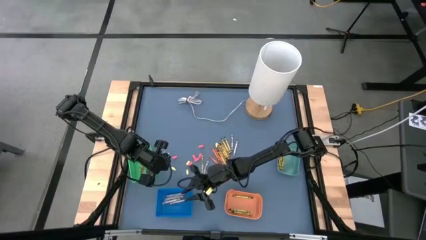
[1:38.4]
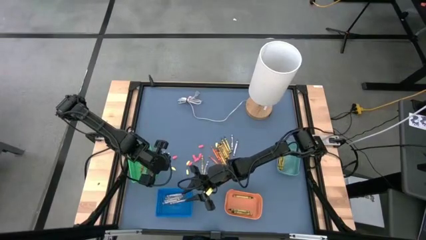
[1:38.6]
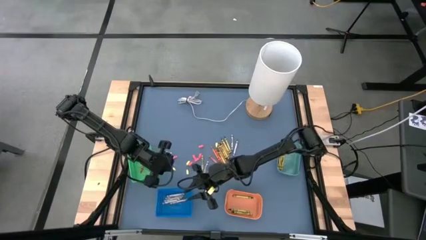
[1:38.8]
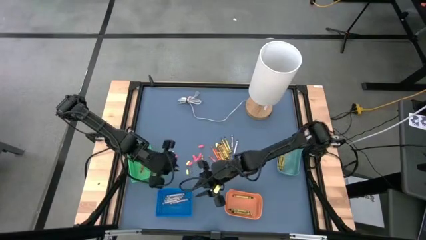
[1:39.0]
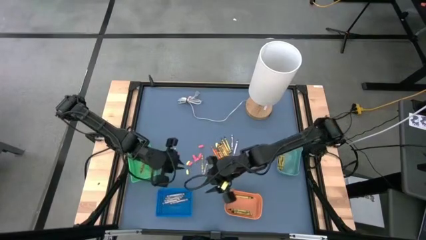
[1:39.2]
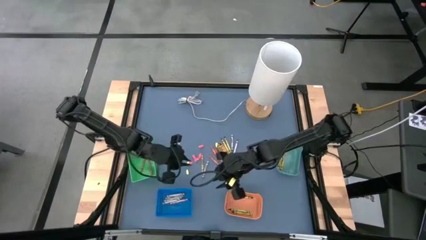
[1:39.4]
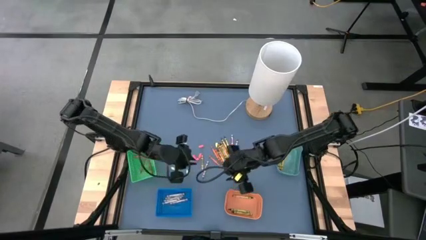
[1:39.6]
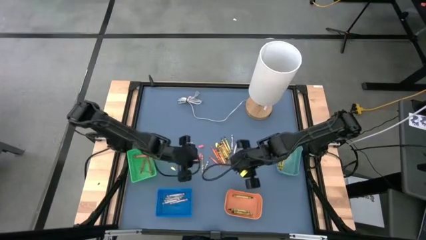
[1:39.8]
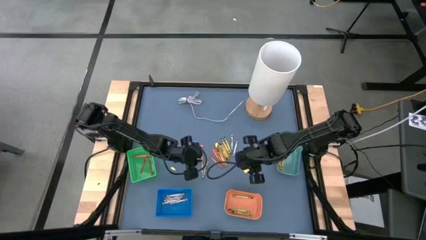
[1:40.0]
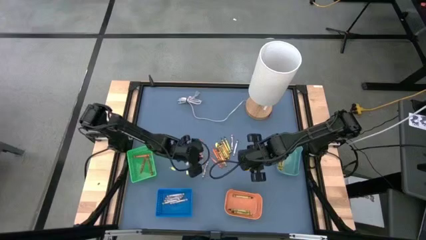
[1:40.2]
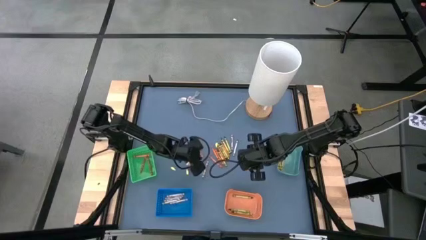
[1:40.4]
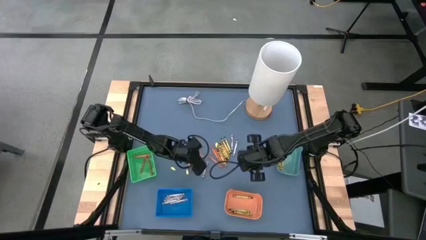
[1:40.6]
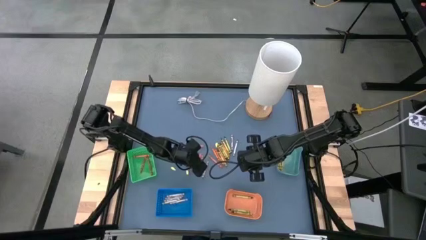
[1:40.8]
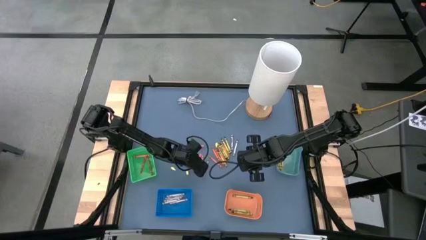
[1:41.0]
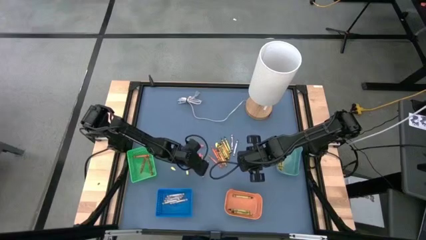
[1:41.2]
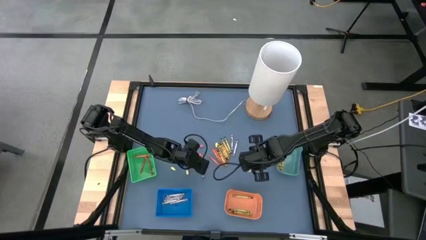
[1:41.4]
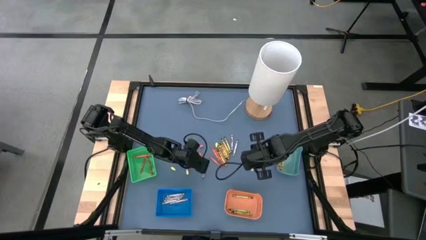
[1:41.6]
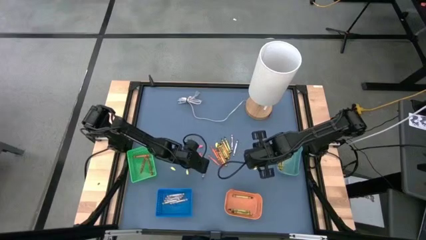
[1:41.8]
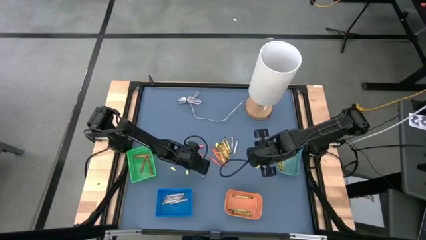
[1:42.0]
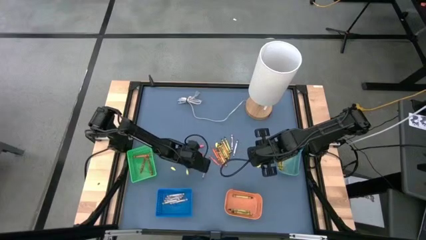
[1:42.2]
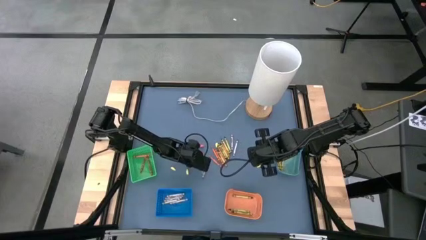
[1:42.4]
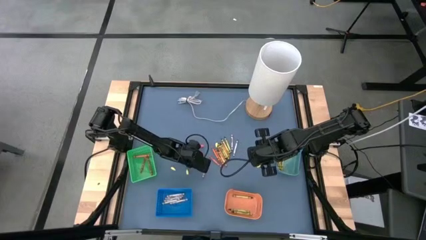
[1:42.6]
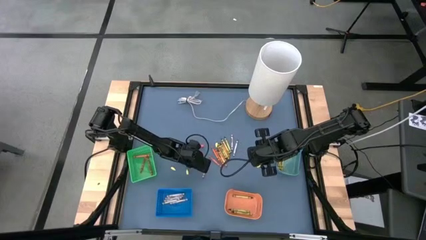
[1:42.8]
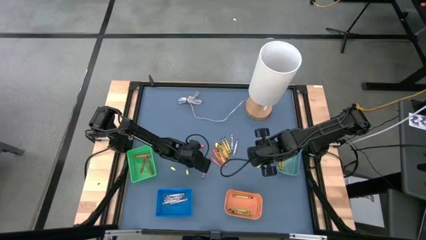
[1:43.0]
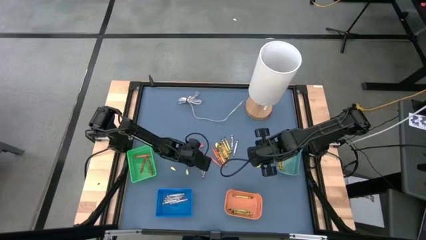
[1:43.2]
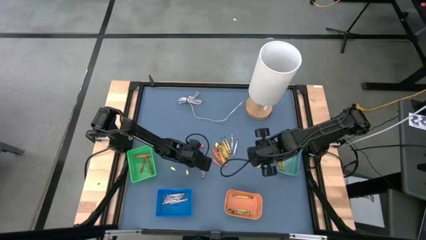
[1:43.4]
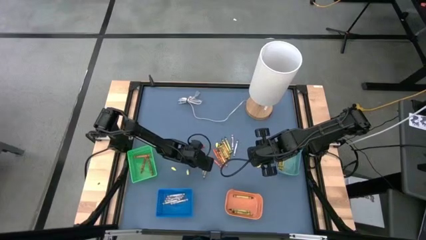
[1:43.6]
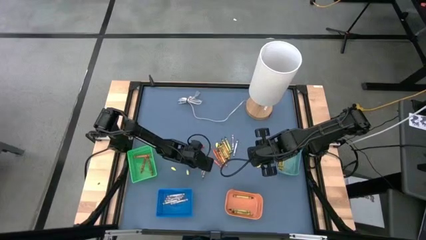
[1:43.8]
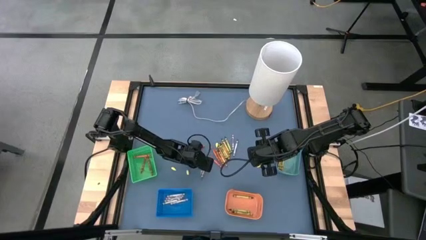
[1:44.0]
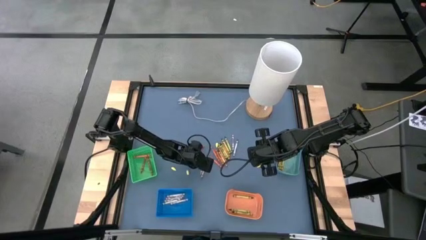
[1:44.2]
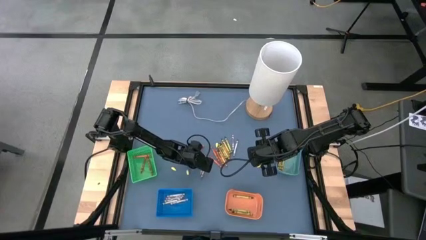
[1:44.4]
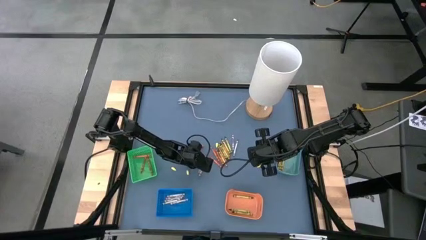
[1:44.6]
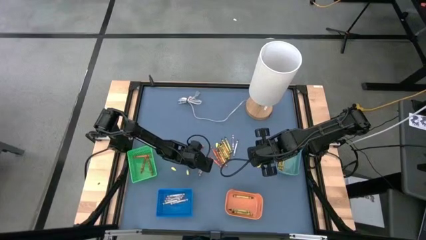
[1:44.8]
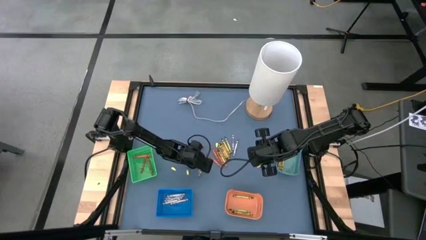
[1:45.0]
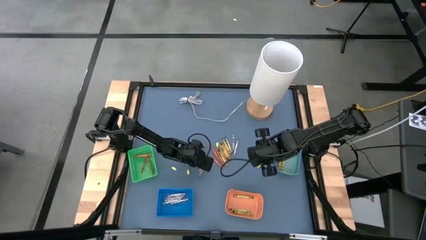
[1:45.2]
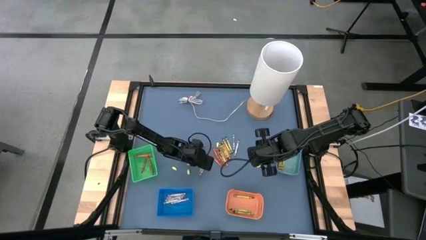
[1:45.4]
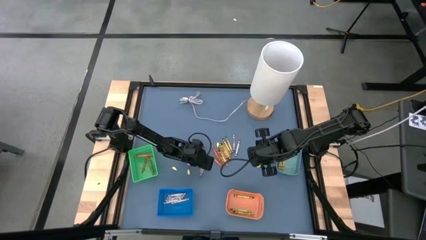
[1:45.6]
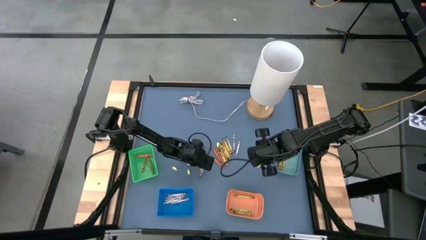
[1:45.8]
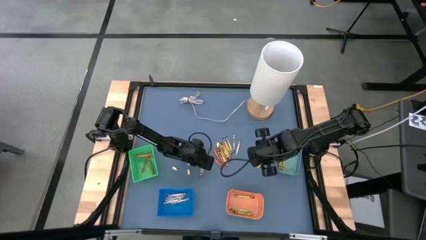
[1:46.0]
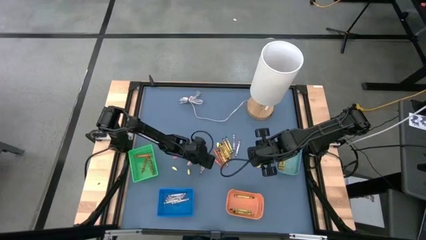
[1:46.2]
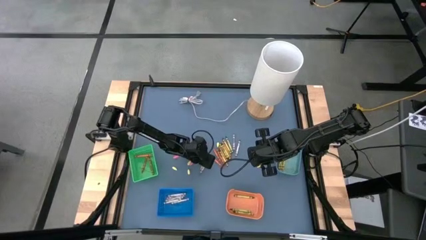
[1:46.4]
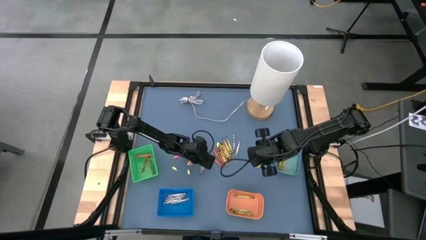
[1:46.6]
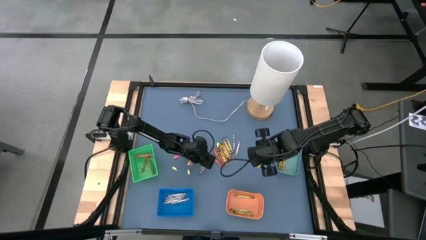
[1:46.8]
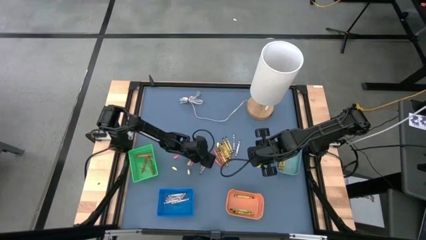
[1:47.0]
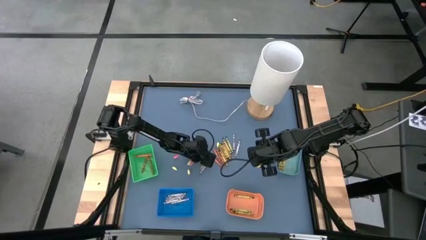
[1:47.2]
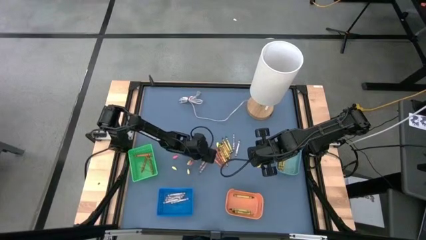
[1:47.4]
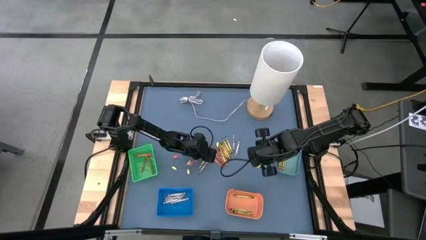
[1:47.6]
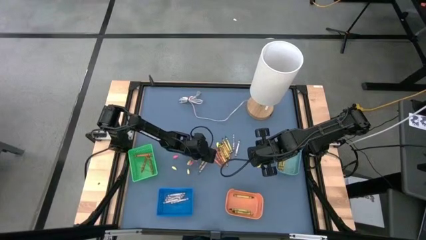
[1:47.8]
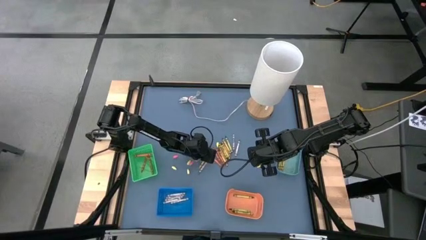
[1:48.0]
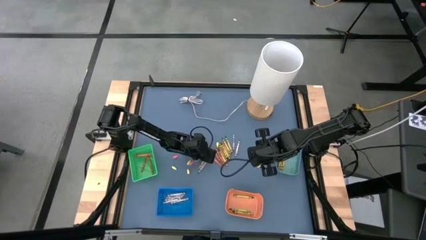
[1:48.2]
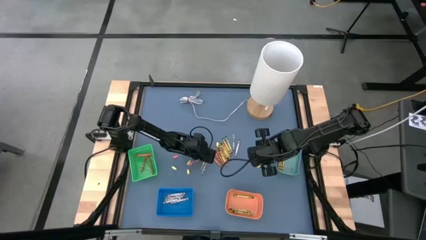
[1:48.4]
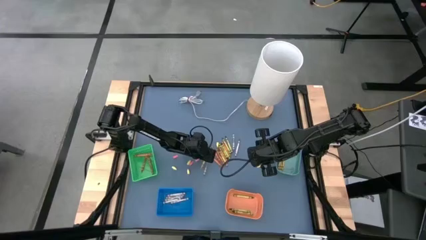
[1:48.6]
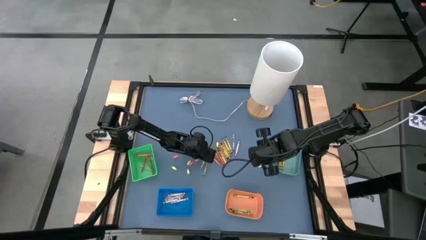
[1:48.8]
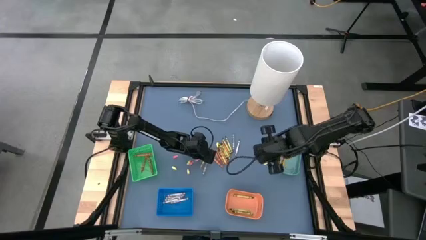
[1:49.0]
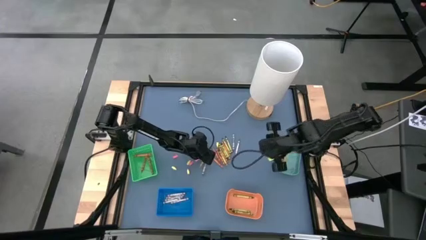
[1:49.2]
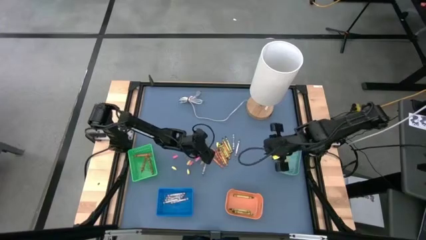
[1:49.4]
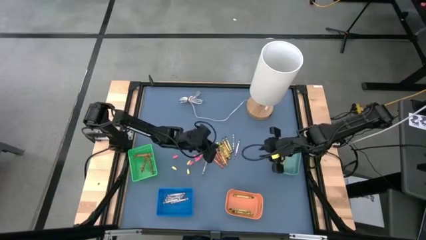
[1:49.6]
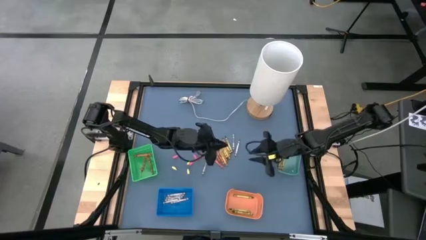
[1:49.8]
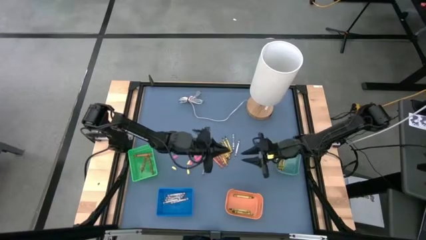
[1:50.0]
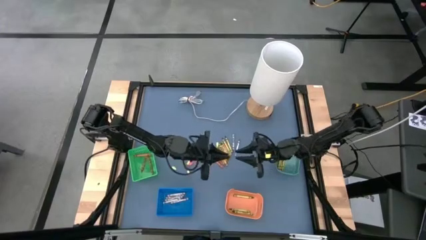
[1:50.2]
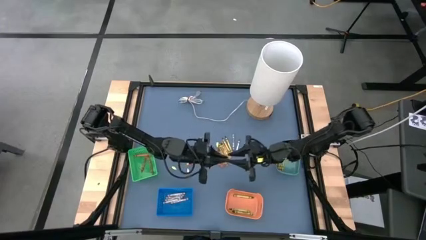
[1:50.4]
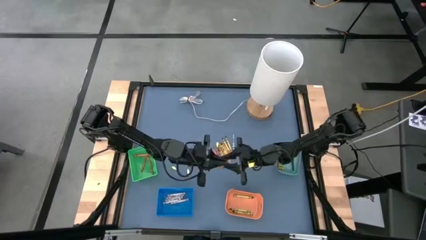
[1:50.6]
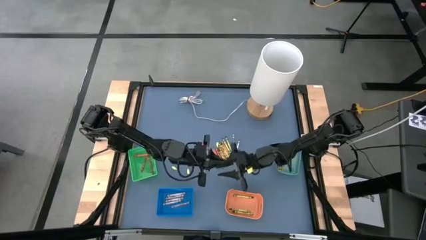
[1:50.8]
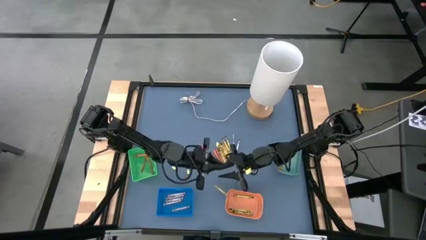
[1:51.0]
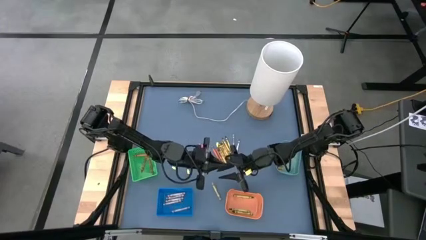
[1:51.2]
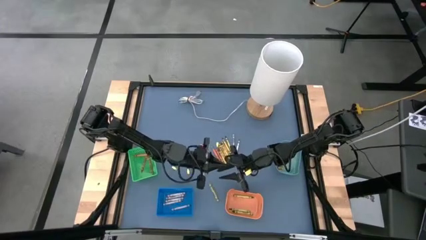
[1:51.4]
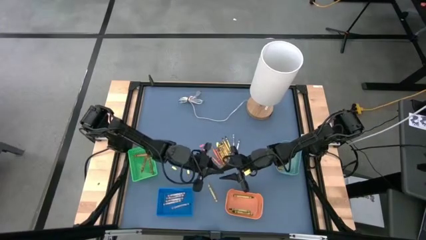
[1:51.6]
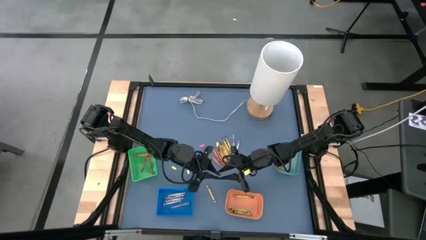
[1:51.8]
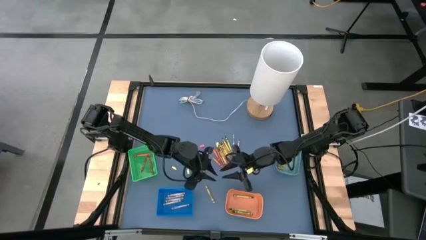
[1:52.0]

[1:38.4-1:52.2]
Task: Sort crayons
Put the yellow crayon into the dark green bin

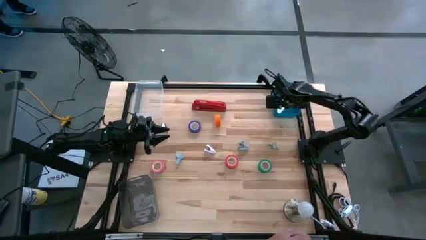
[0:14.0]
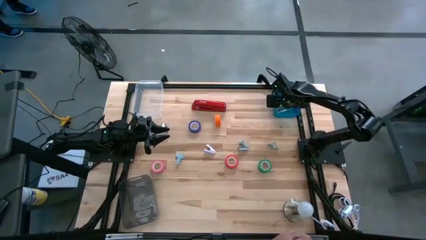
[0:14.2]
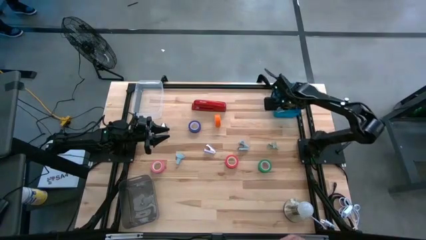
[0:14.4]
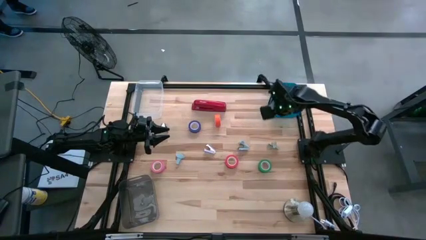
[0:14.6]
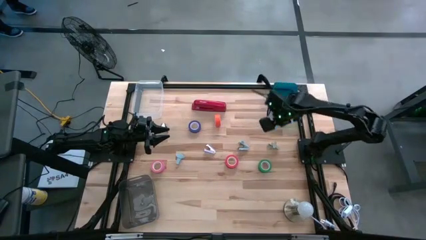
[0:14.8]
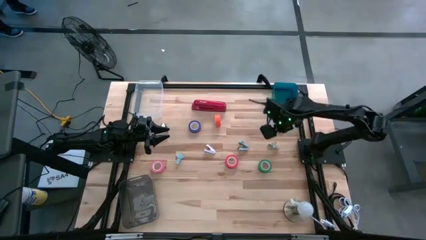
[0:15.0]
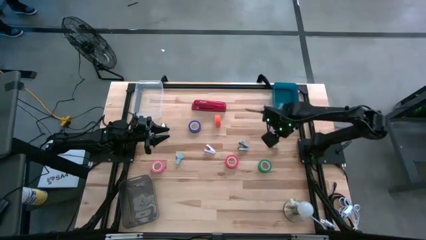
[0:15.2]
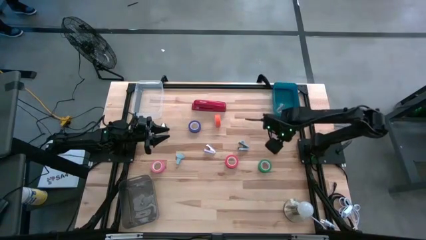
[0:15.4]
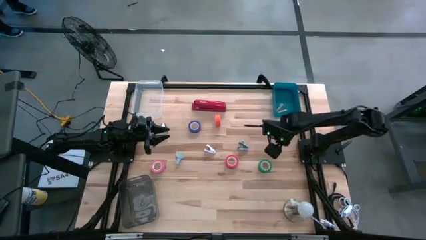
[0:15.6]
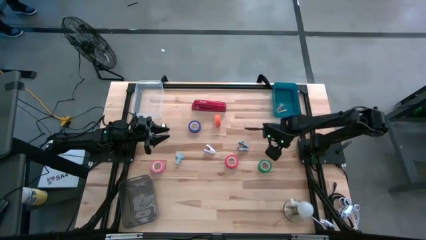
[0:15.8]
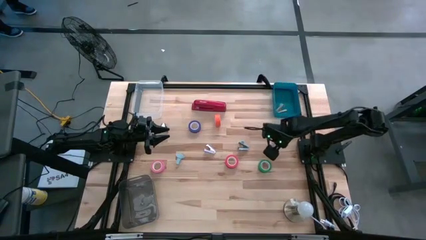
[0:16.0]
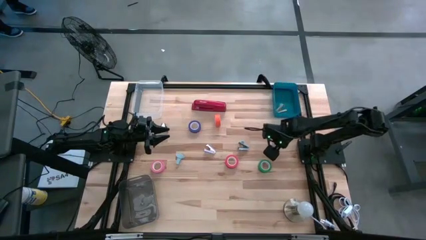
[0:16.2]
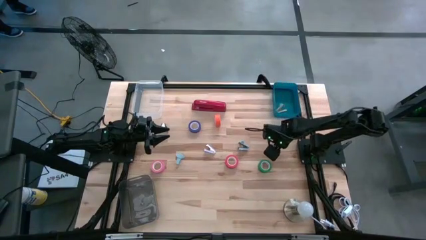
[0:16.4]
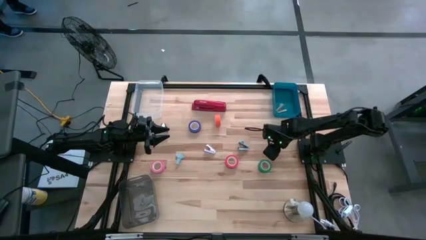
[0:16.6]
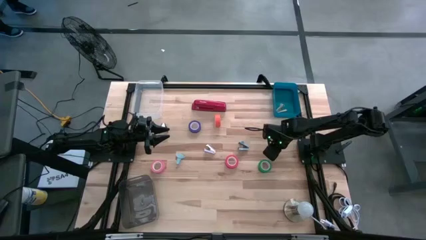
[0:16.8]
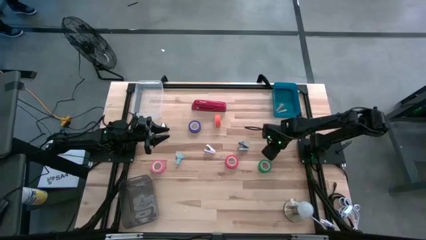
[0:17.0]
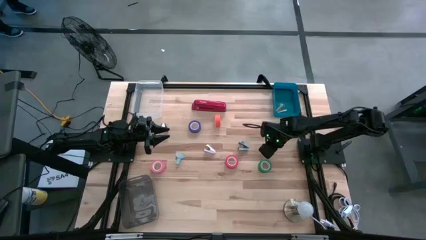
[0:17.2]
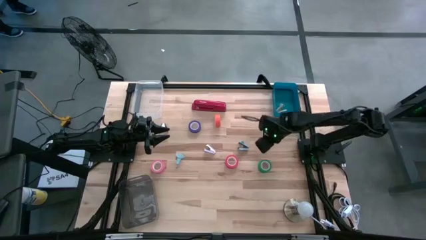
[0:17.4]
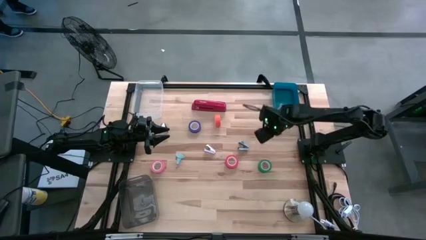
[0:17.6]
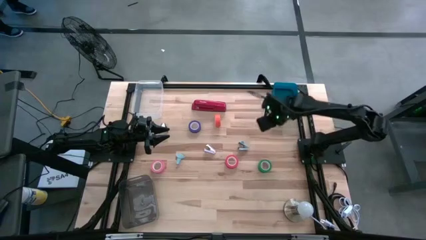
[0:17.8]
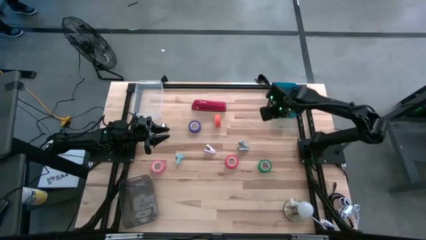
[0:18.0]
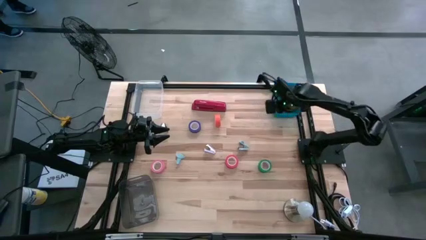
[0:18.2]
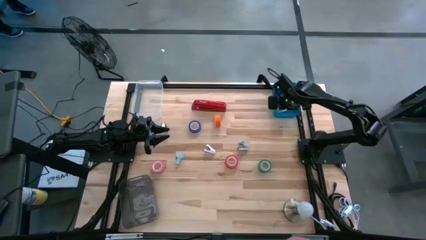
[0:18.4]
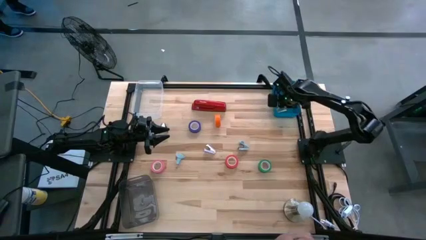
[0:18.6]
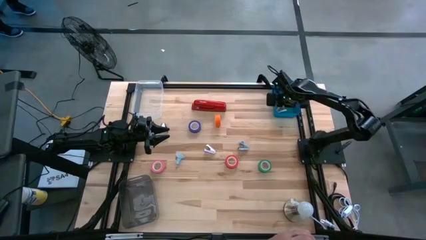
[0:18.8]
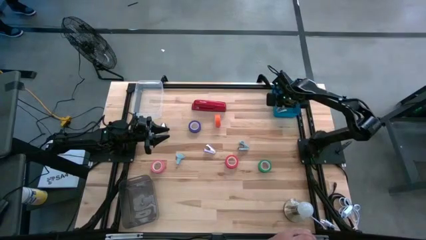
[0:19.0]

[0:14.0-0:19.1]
Task: Pick and place Stapler, Stapler remover, tape
Put the white staple remover into the blue bin
